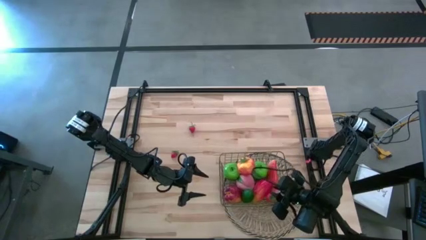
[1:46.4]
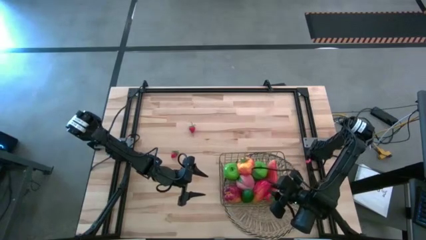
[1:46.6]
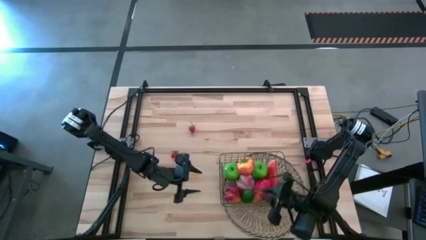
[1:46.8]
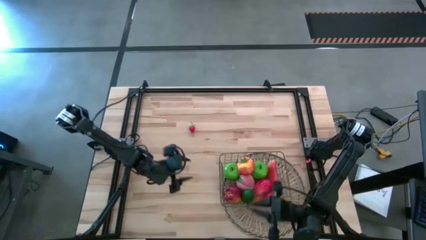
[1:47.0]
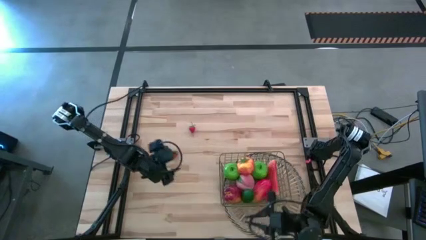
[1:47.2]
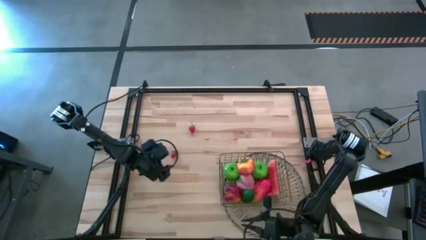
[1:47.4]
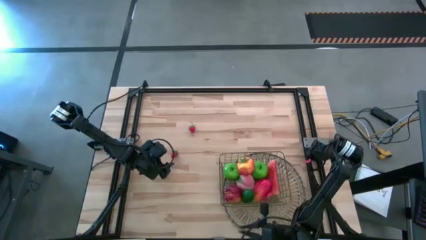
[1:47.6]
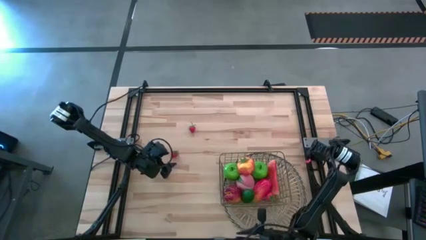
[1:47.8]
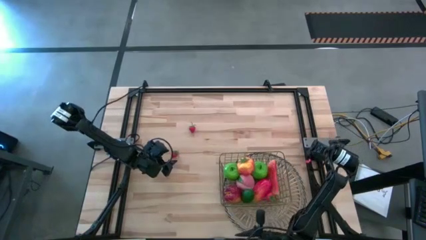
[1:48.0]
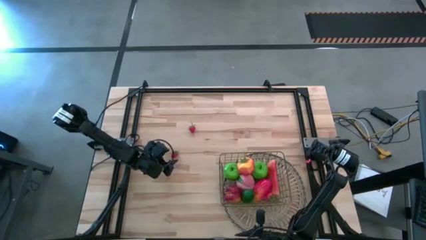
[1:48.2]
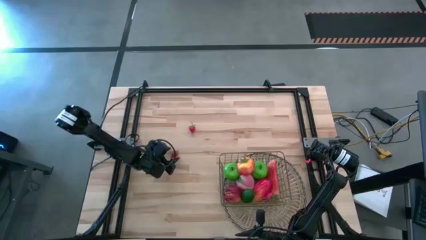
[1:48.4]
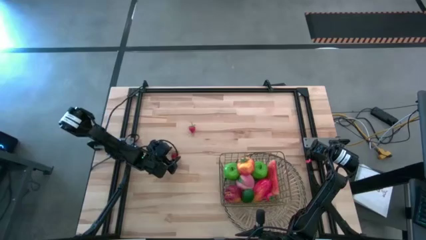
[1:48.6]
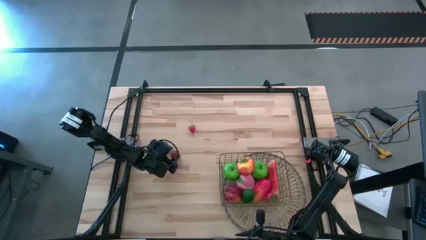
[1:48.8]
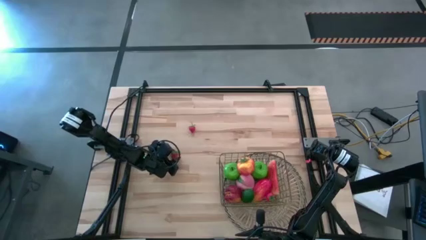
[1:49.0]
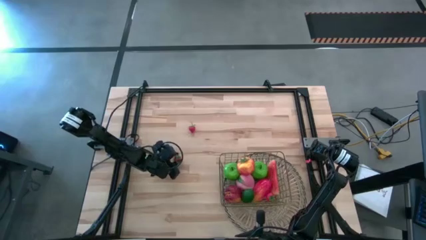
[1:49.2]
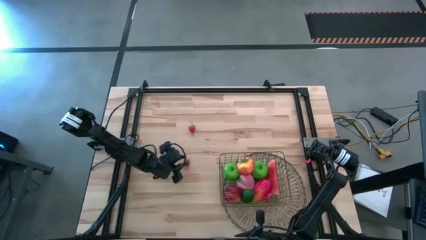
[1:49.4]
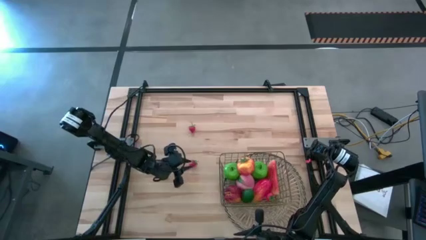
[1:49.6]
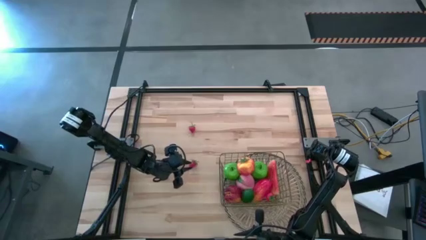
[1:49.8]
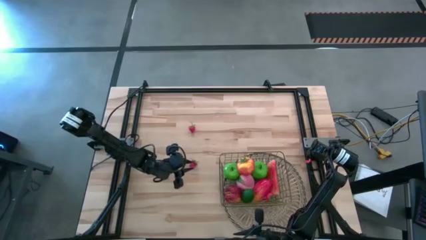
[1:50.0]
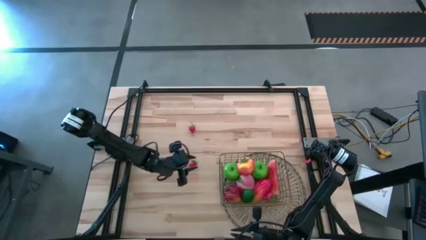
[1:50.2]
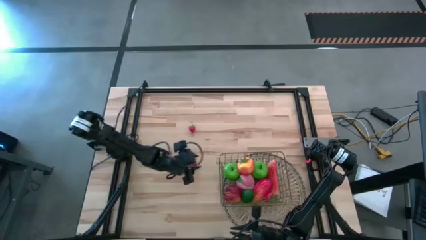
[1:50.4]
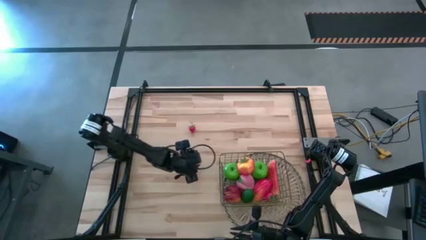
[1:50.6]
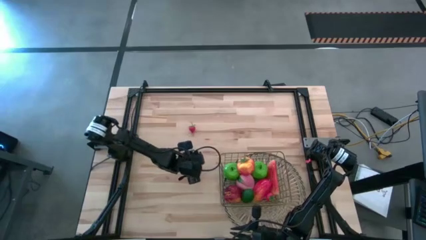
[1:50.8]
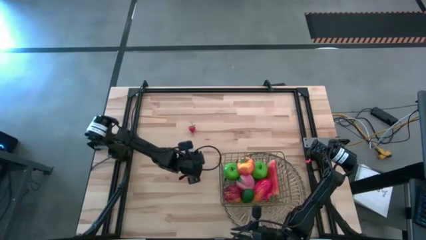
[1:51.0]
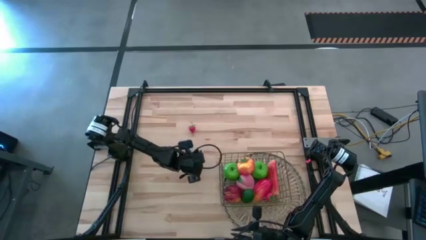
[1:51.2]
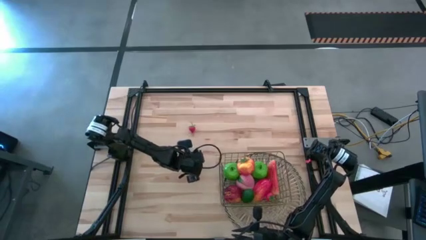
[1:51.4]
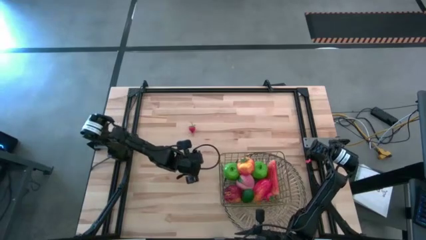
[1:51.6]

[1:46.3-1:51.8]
Task: Build produce basket
Put the bottom strawberry into the wire basket

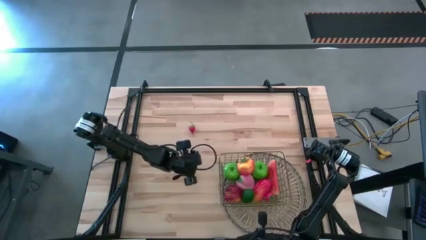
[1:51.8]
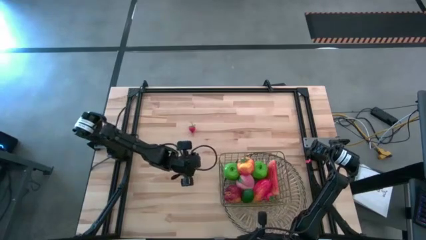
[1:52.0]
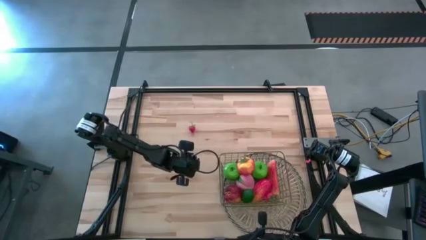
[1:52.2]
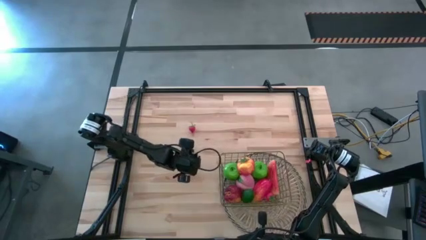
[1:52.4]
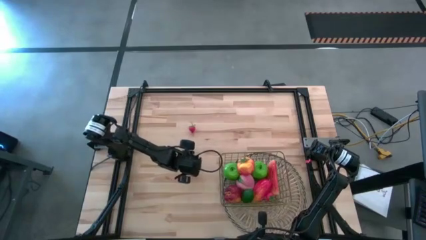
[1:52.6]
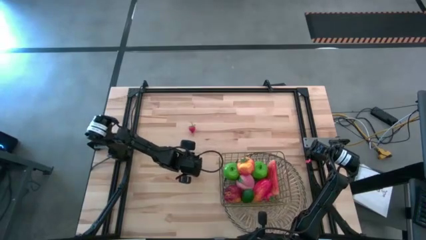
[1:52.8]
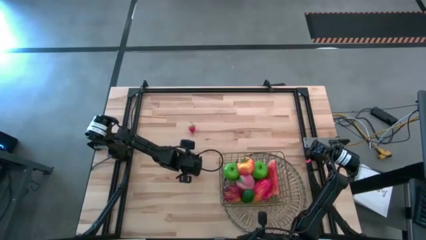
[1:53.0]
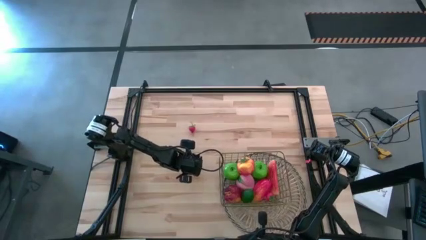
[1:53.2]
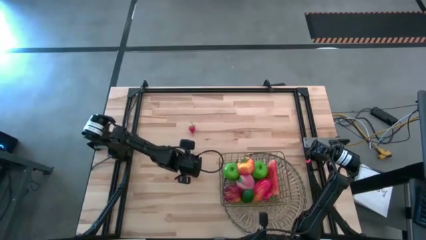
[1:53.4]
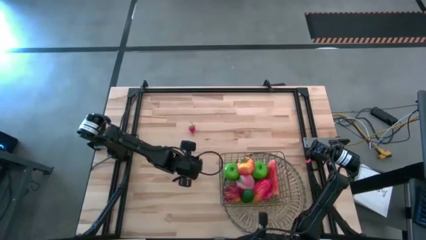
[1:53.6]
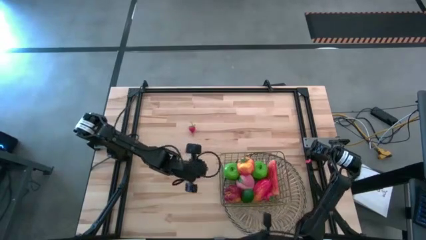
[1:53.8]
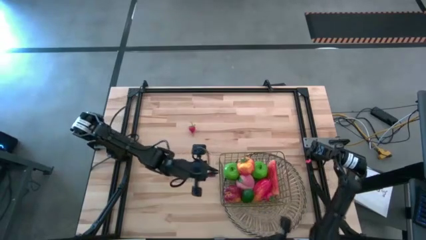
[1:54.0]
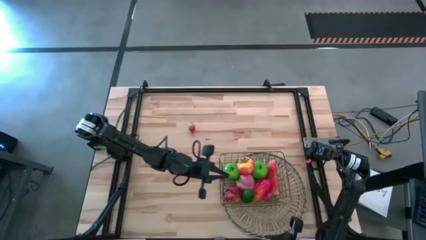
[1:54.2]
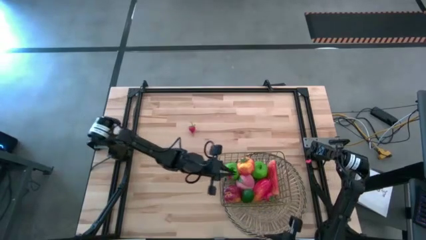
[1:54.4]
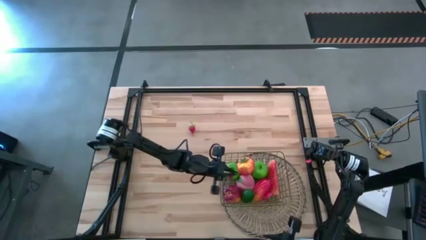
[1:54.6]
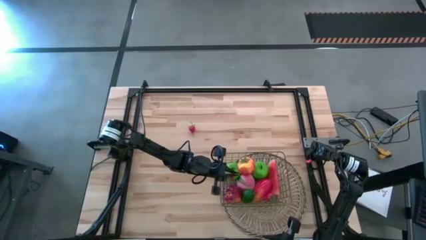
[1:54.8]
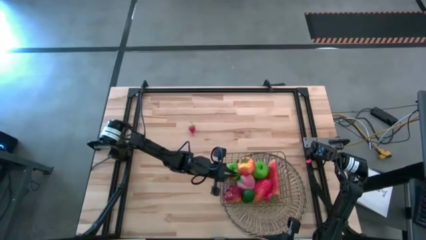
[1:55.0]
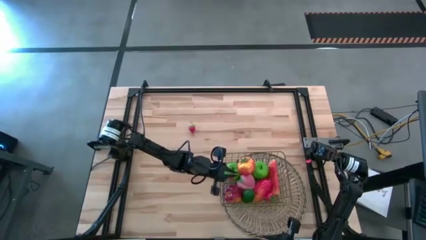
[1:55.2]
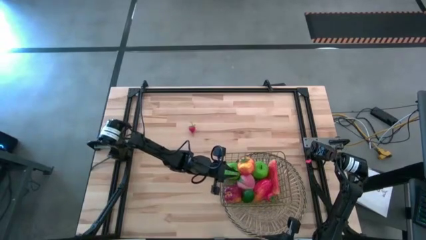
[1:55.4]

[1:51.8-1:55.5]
Put the bottom strawberry into the wire basket

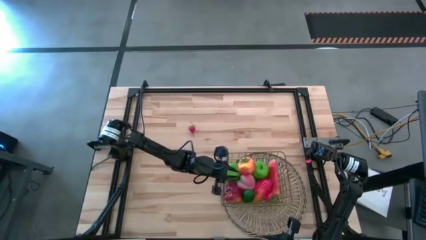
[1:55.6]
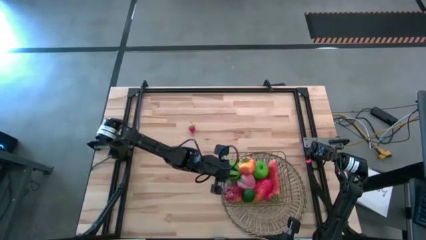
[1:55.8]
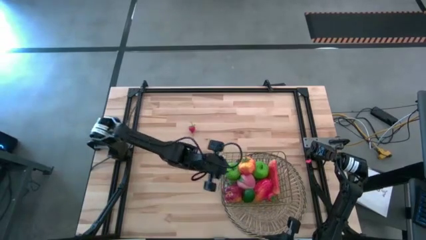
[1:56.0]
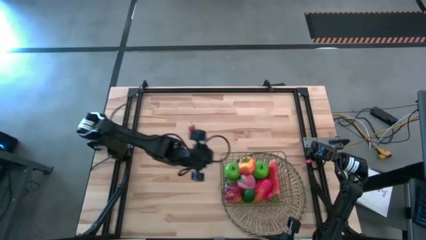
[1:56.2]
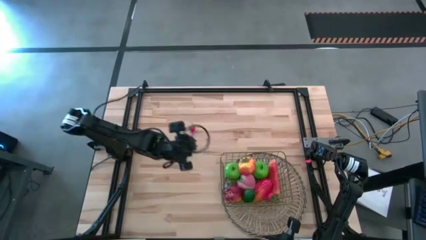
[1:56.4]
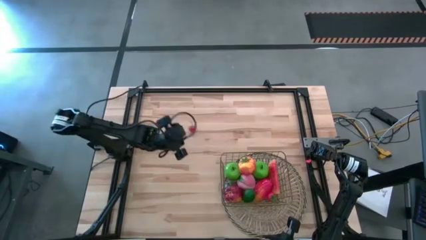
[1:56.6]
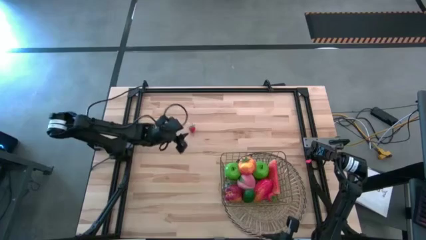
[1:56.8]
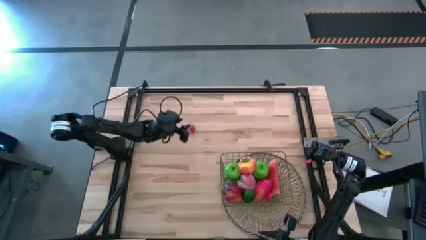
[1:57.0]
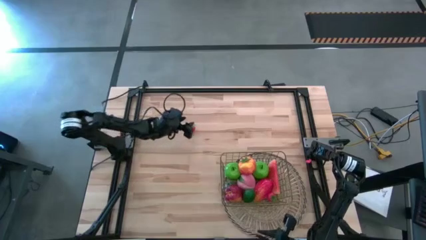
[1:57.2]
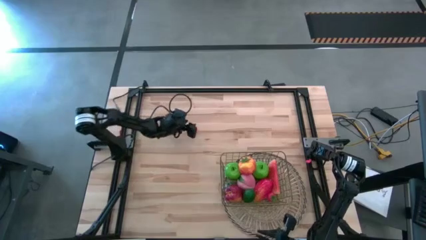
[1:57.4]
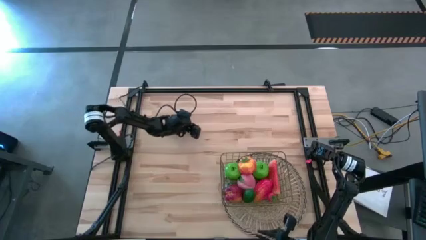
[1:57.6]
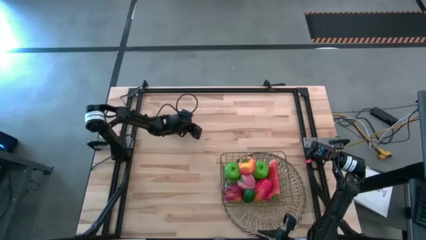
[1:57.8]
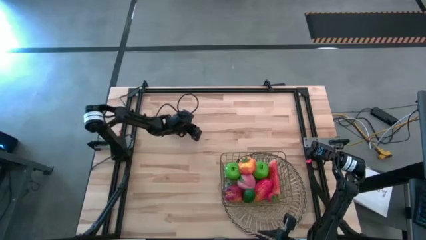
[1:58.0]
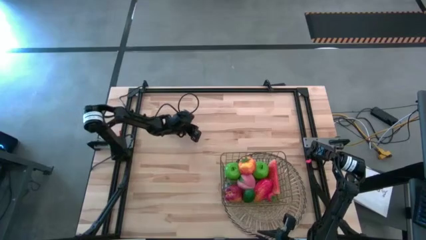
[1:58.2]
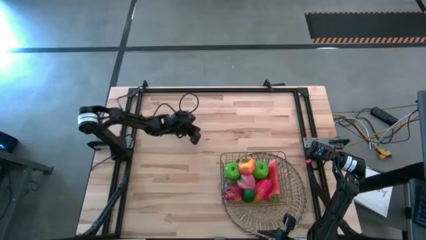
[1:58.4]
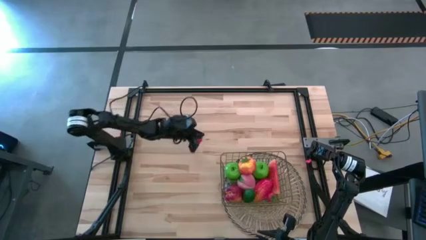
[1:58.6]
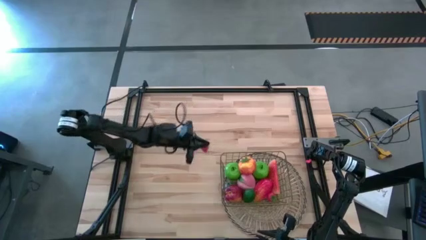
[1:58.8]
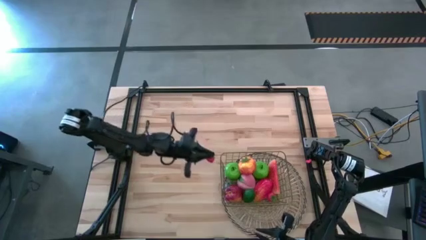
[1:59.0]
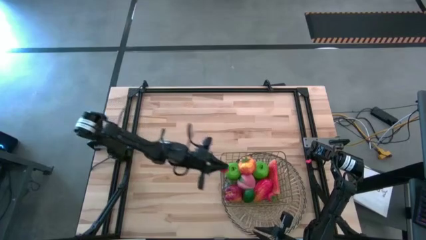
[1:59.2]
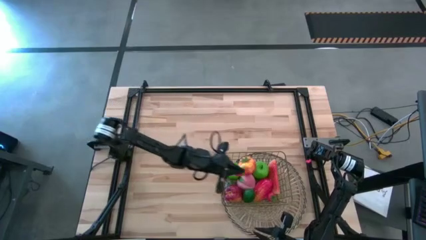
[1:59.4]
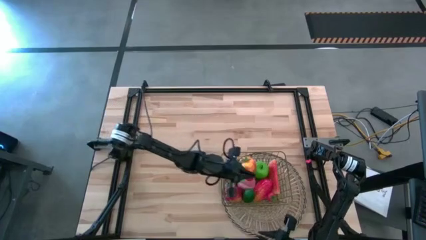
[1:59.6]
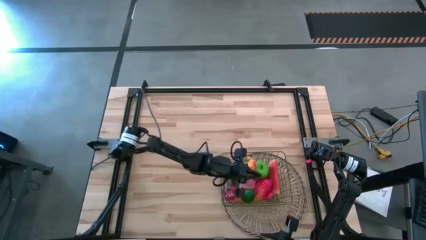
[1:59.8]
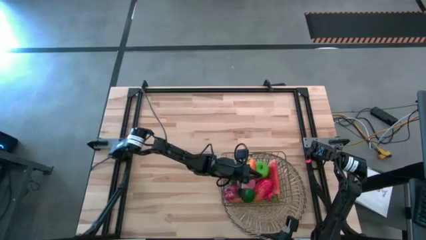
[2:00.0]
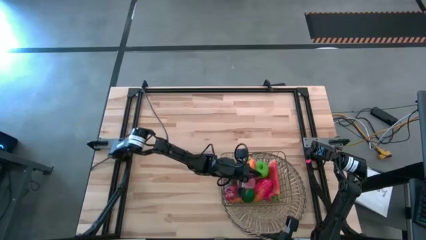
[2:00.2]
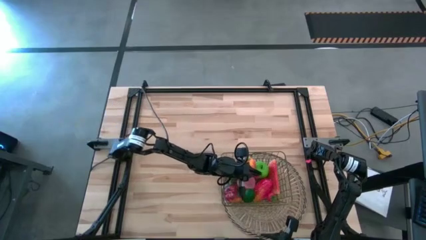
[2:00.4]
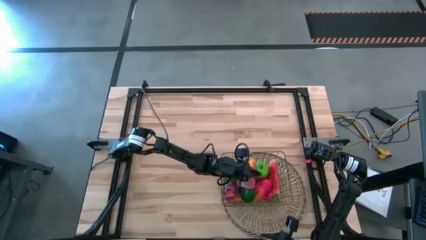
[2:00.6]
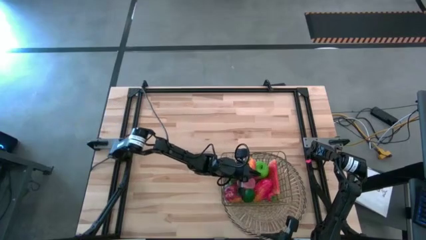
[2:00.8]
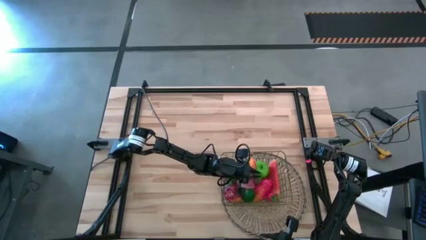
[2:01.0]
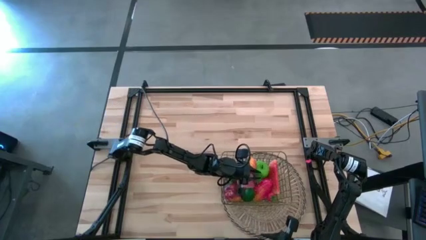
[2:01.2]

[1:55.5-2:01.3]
Put the strawberry into the wire basket
